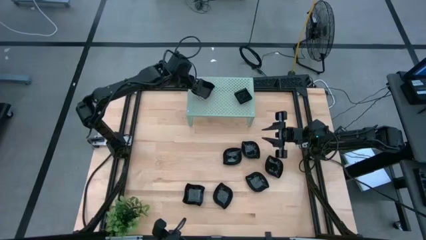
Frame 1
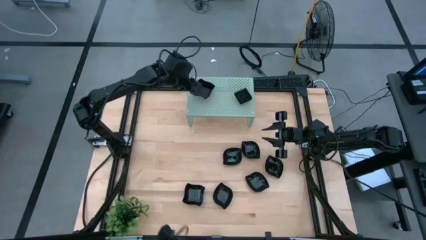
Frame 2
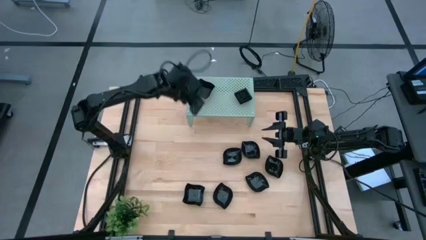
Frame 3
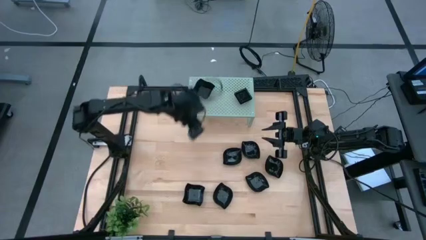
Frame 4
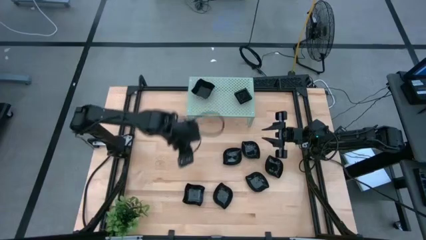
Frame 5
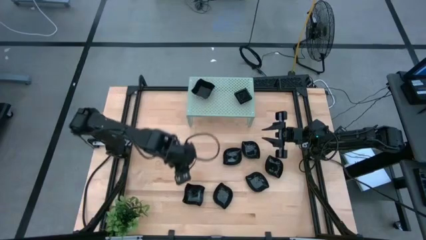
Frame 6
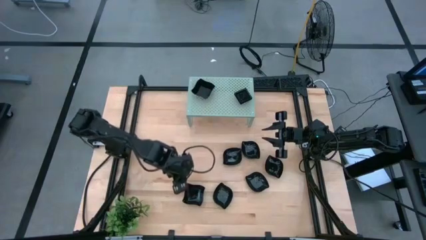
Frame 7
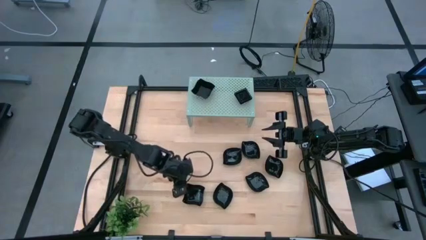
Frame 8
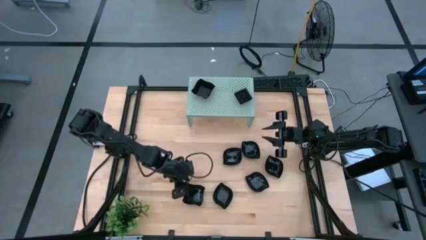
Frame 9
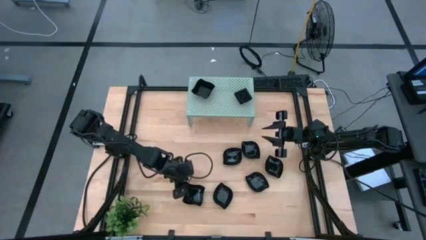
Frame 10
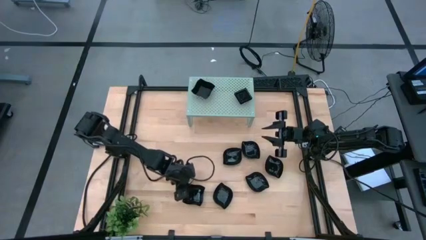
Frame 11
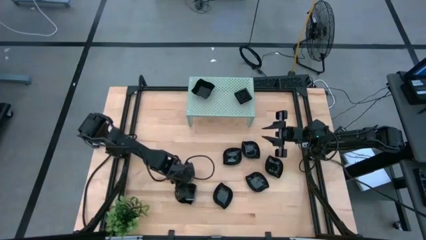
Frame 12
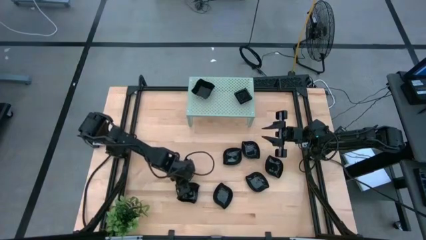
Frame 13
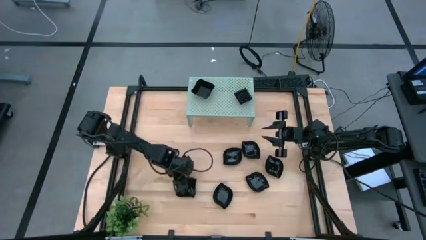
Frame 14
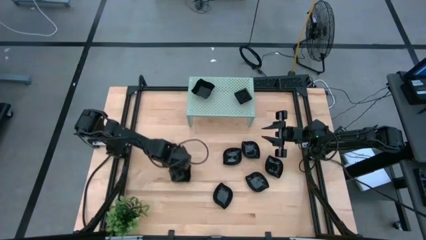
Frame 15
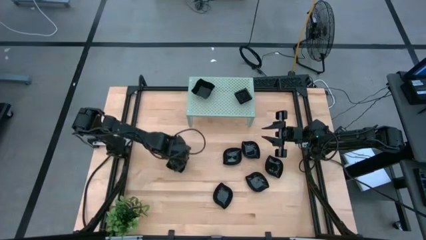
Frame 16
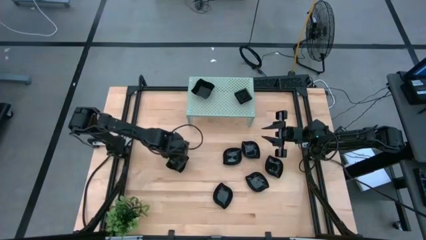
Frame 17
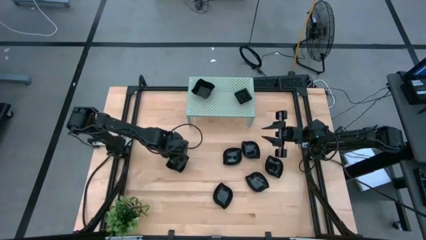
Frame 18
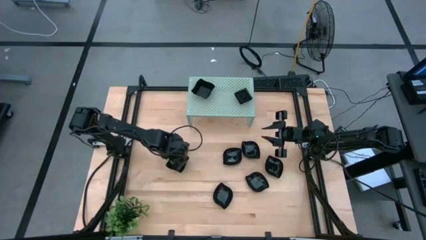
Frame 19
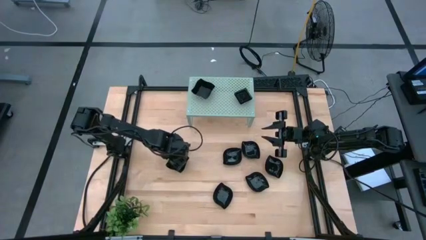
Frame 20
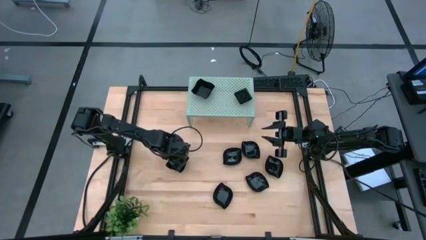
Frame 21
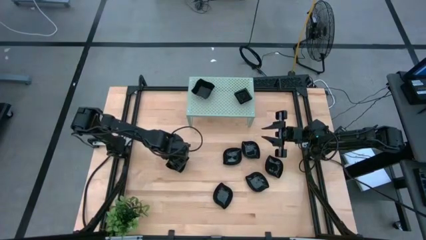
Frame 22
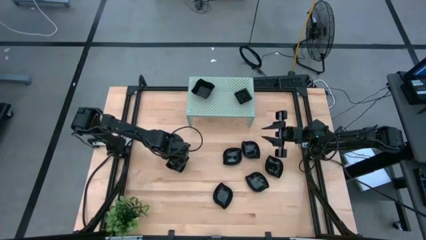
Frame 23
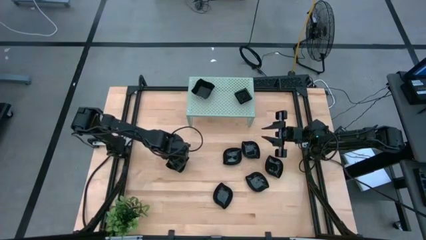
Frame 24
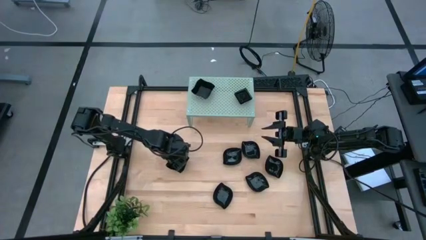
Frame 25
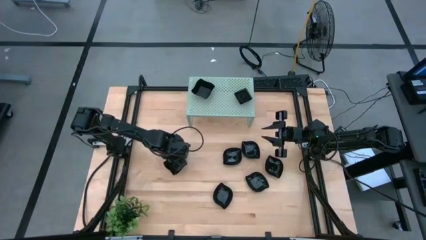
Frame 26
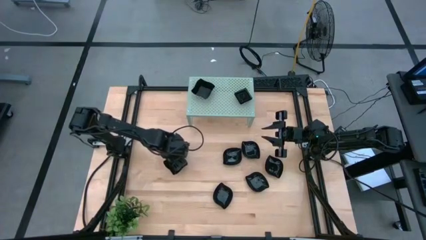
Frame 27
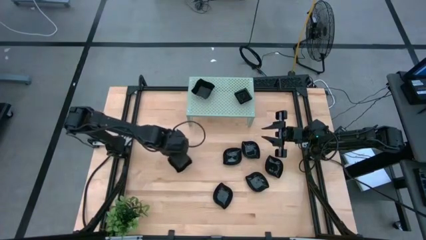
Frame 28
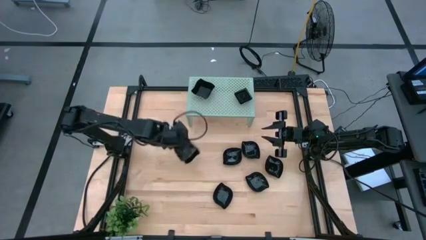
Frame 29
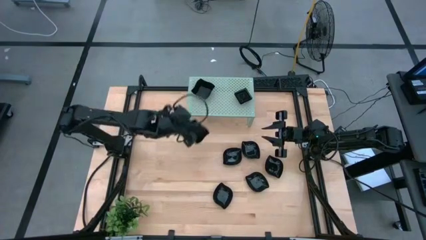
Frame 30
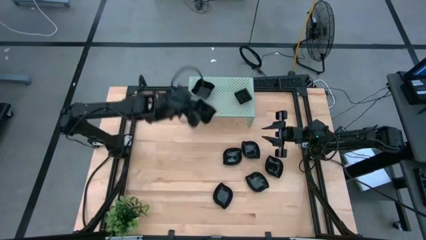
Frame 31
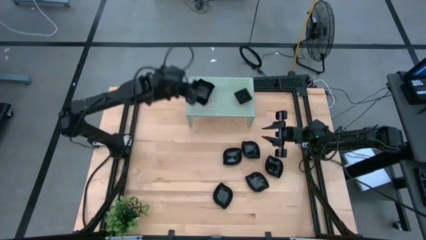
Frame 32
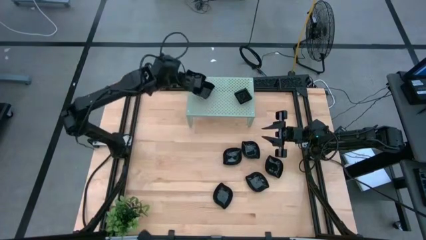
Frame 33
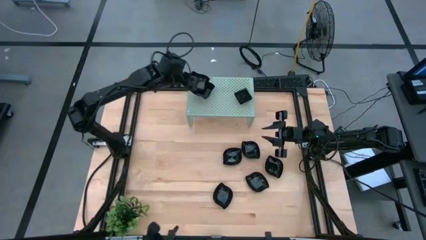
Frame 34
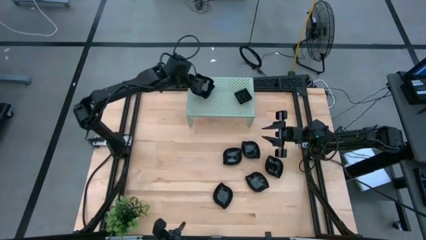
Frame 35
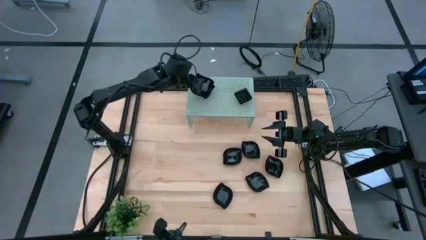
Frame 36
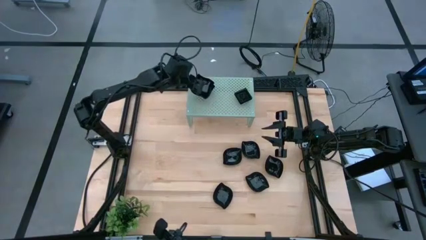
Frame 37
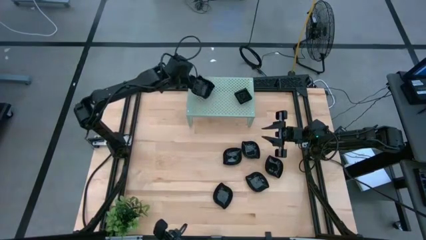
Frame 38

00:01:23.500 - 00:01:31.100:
Task: Pick & Place Mini shaped plates
Stack the black distorted square plate on top of the other black distorted square plates on the shelf

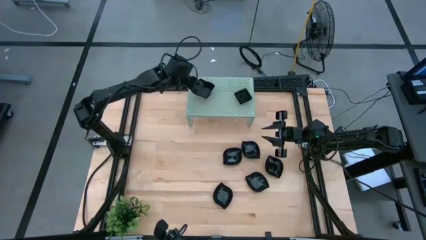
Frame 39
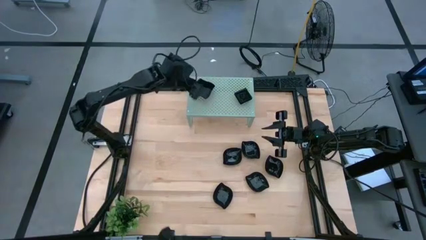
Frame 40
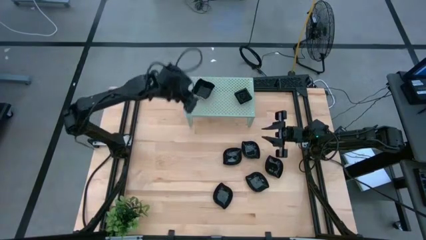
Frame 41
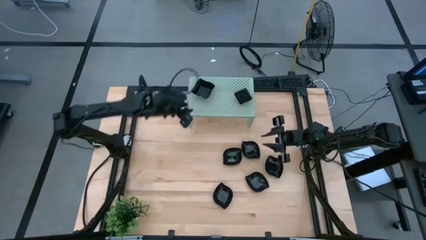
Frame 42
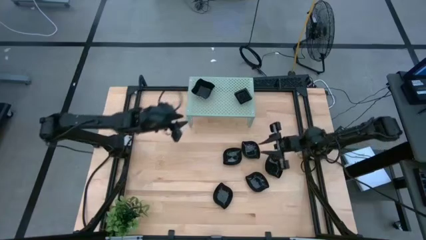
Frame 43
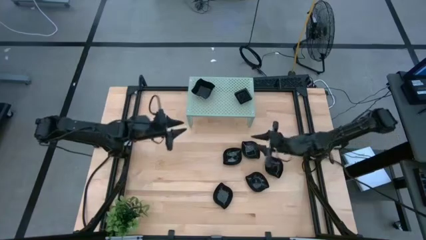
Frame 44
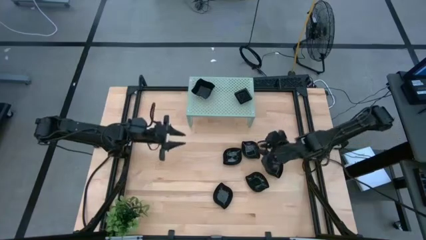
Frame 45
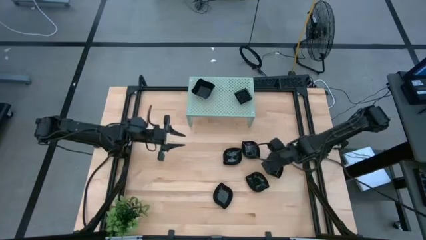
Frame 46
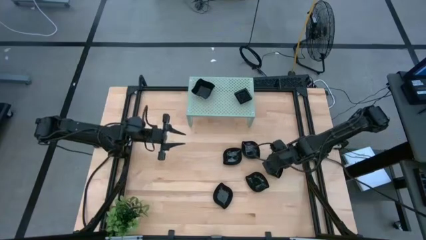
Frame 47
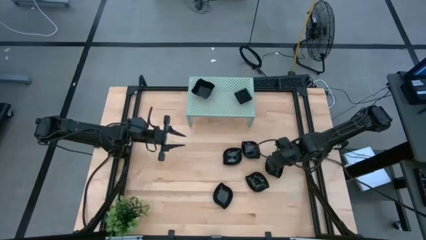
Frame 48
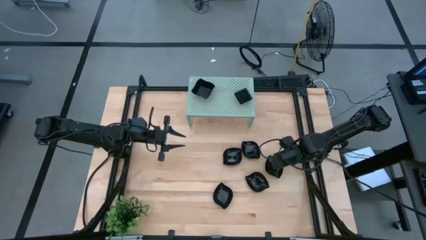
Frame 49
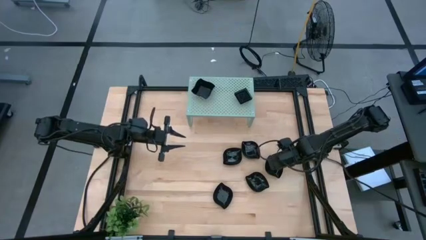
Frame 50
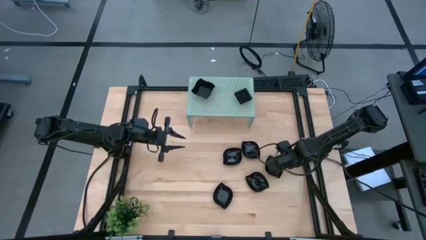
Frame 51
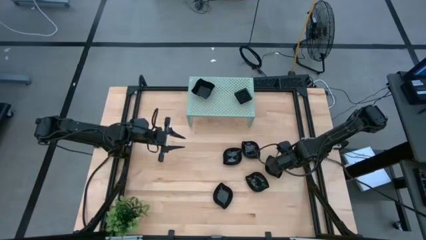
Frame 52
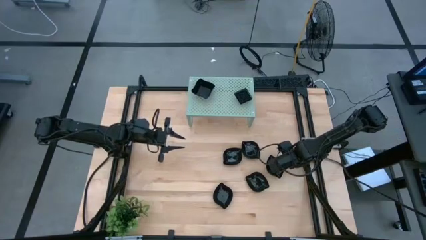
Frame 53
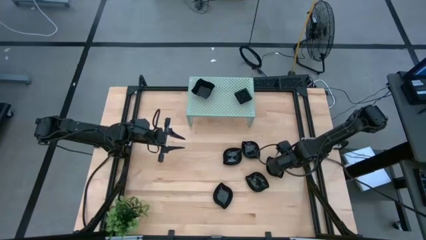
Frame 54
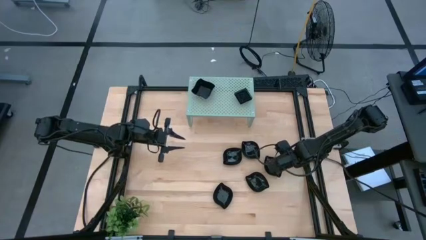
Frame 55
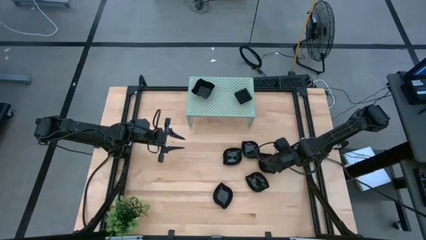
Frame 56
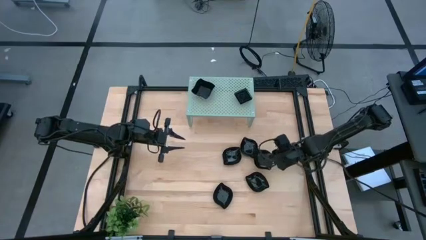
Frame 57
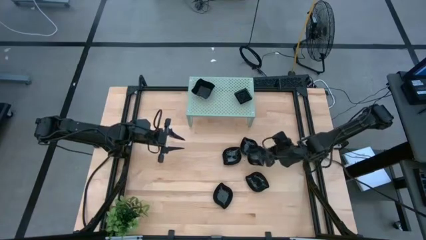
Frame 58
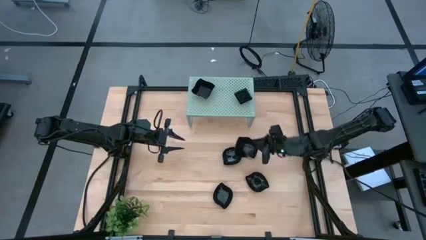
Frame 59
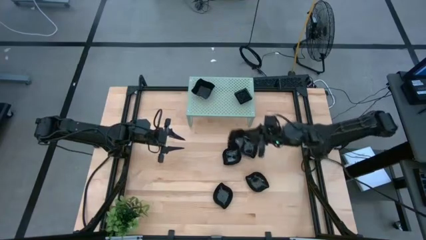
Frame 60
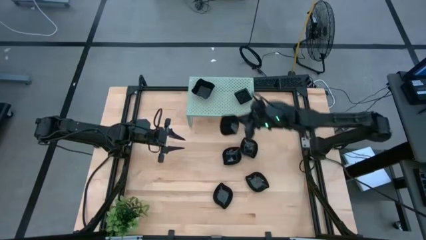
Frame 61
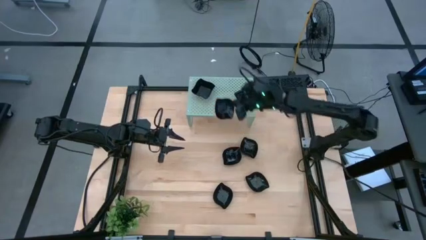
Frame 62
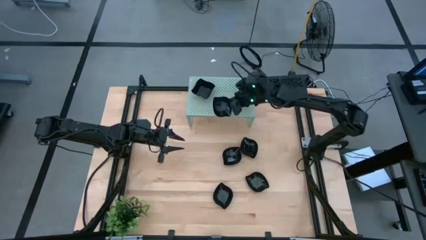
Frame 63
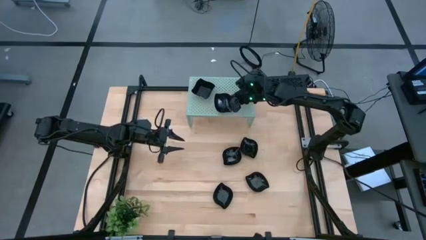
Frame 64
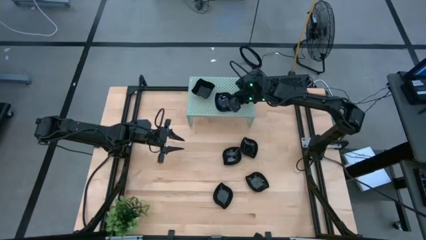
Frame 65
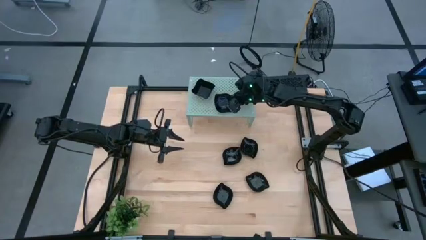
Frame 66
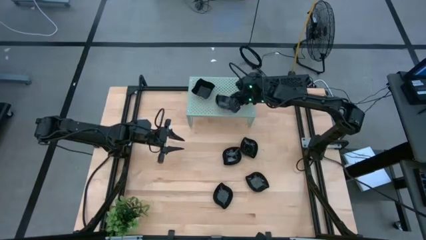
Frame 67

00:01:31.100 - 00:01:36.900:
Put the black leaf shaped plate on the shelf

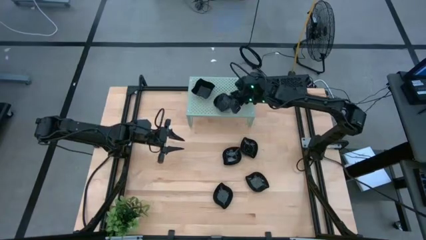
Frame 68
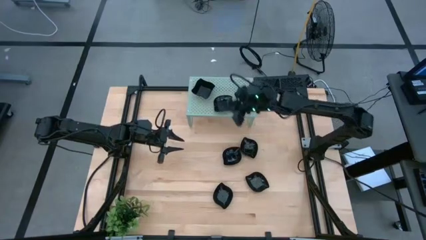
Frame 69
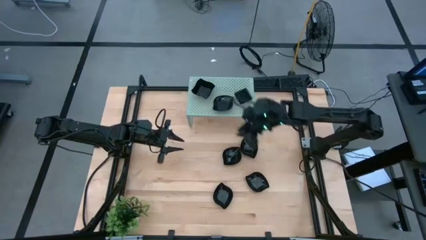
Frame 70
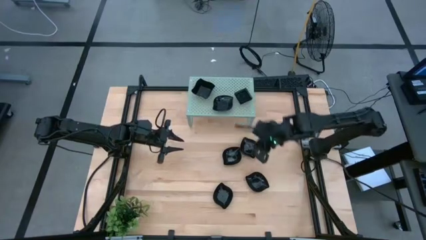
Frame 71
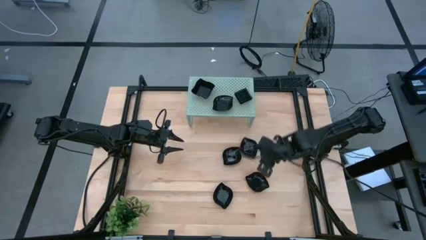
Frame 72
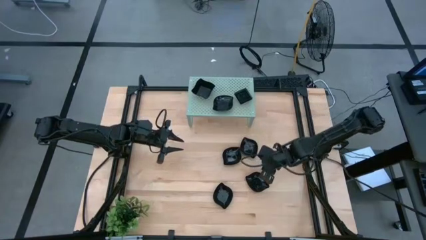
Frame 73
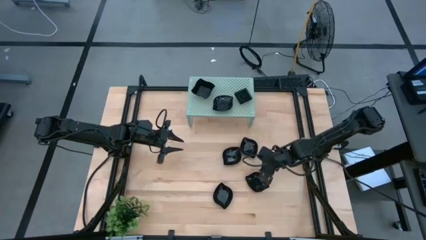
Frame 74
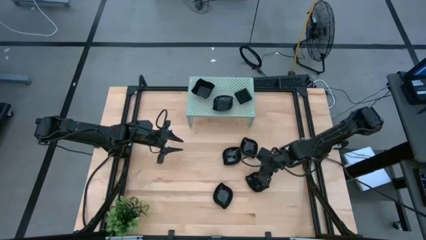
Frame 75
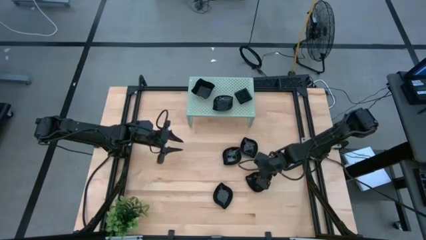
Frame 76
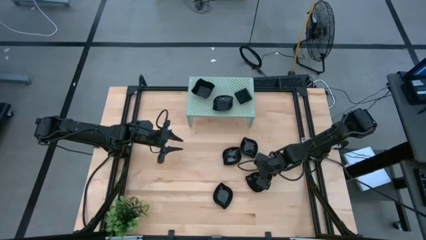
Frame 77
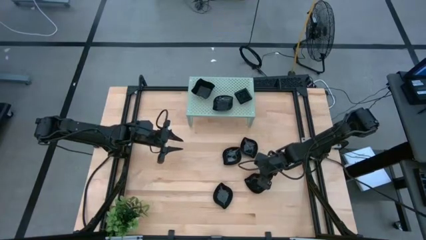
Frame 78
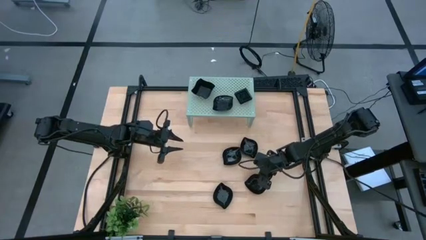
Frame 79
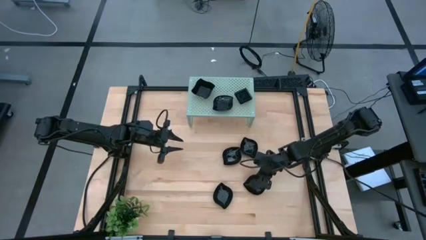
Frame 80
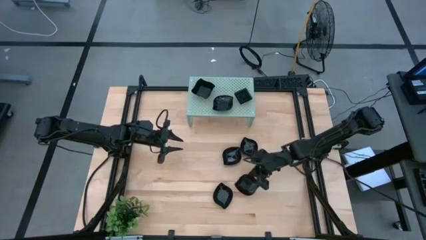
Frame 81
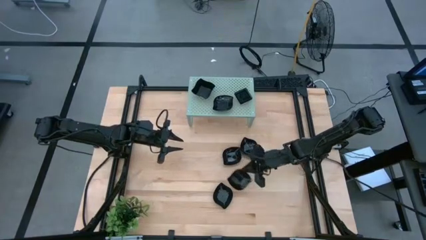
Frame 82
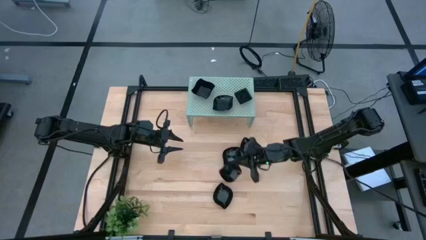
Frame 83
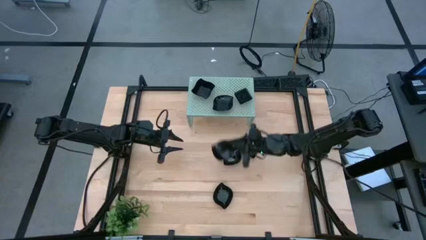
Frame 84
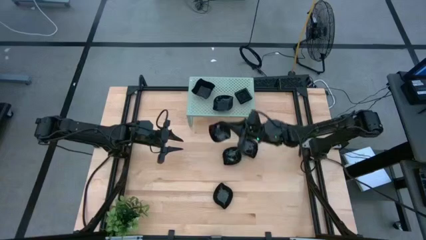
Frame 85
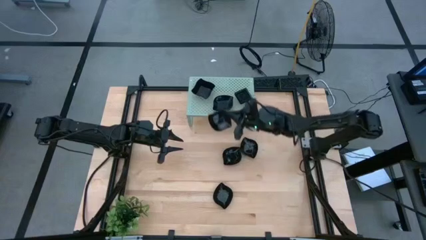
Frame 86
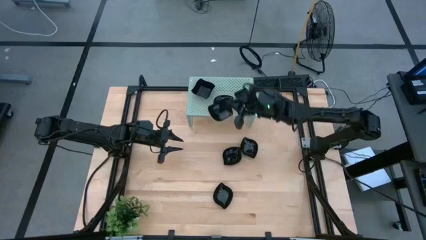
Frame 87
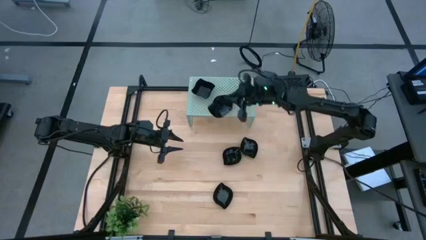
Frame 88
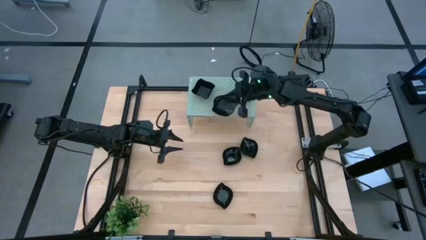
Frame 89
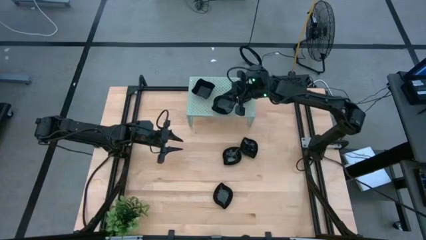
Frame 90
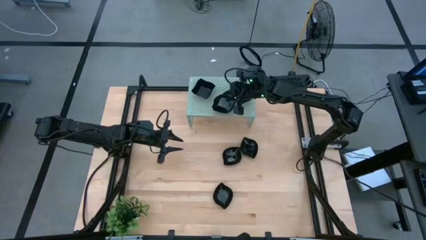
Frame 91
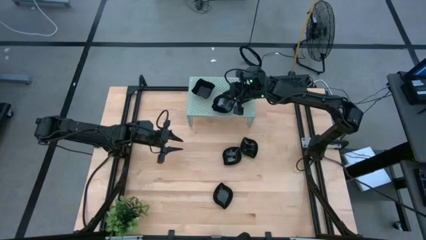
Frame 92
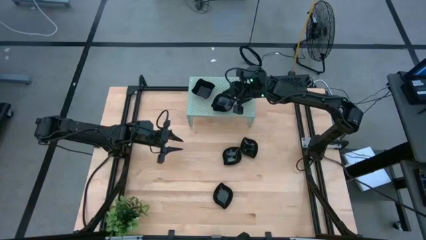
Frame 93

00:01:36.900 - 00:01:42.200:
Stack the black leaf shaped plate on top of the other black leaf shaped plate on the shelf
